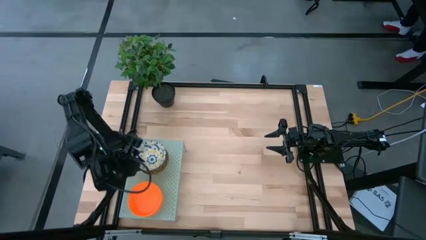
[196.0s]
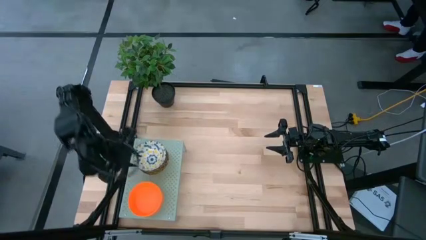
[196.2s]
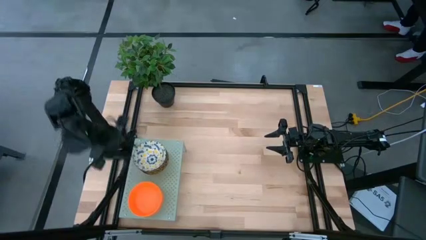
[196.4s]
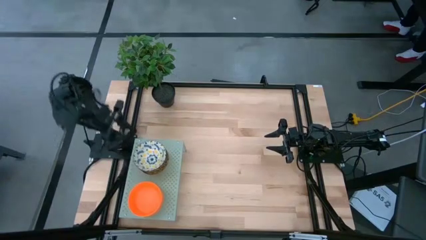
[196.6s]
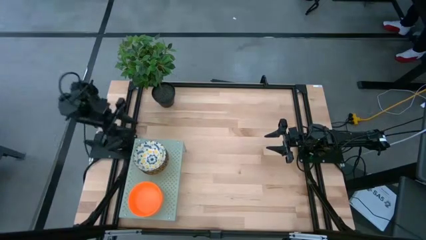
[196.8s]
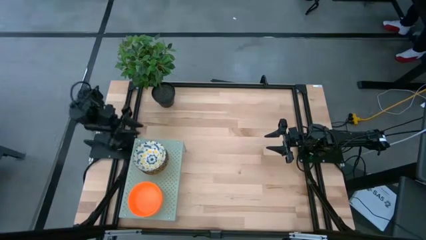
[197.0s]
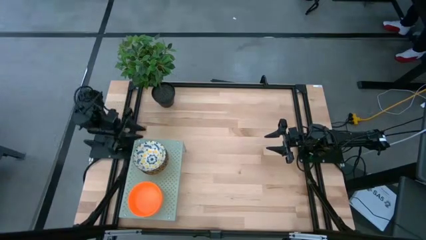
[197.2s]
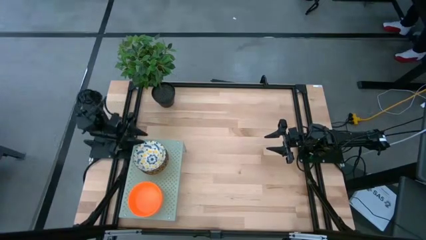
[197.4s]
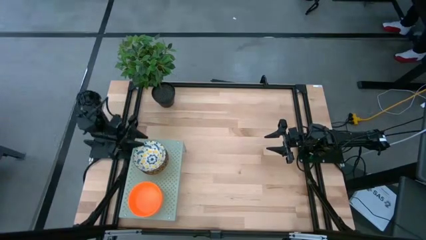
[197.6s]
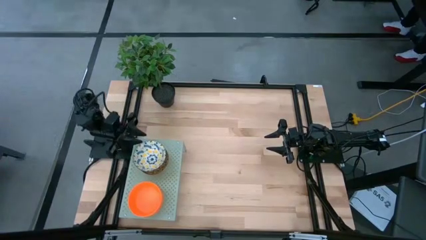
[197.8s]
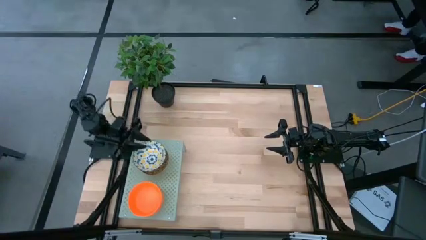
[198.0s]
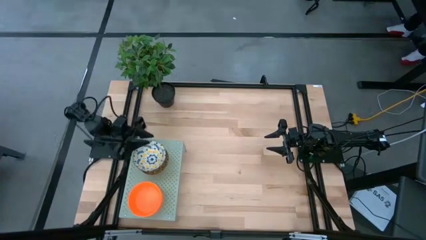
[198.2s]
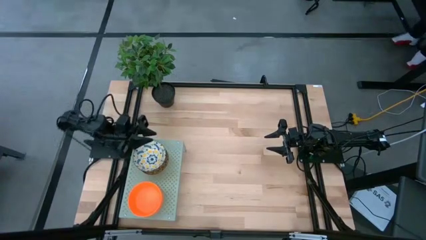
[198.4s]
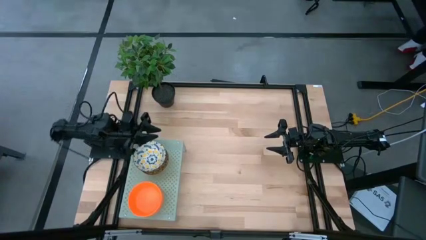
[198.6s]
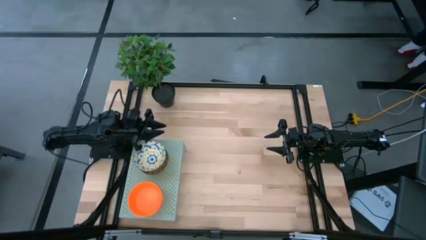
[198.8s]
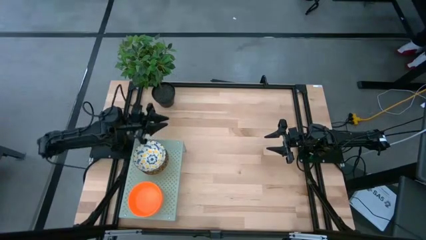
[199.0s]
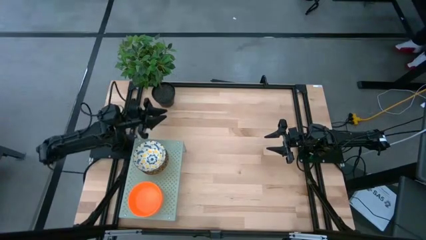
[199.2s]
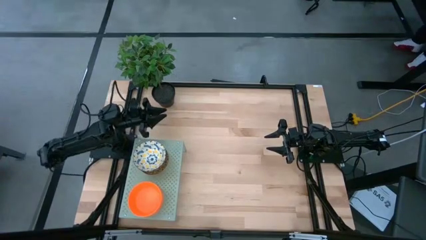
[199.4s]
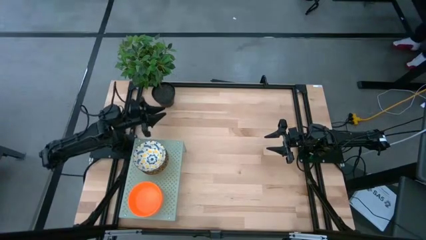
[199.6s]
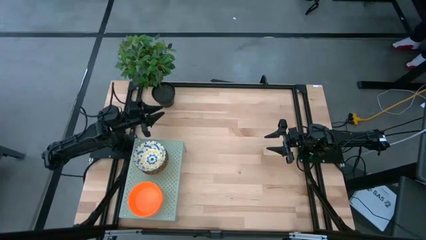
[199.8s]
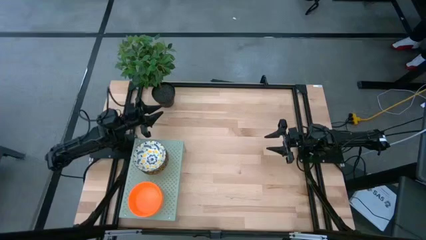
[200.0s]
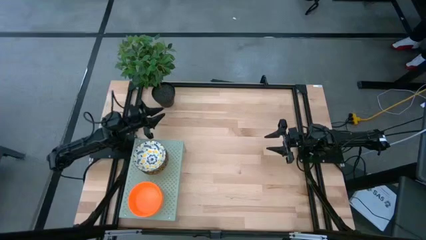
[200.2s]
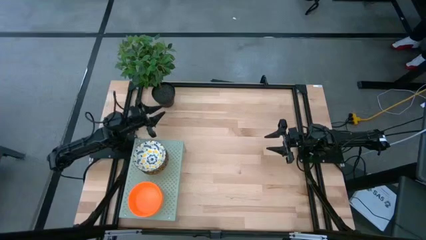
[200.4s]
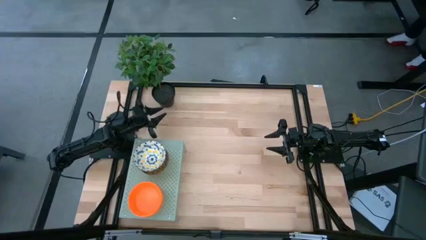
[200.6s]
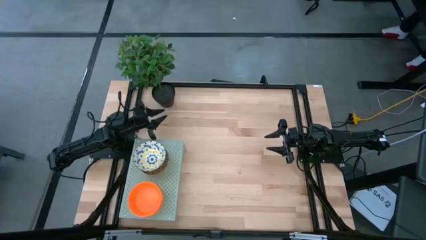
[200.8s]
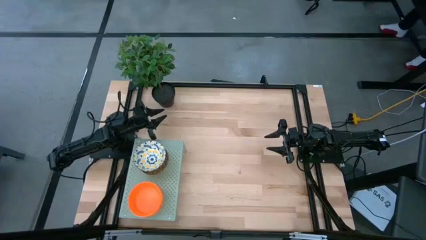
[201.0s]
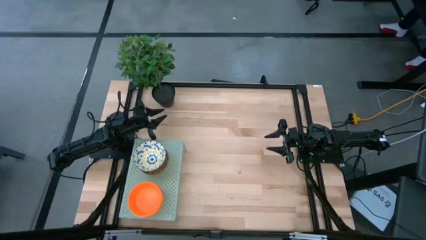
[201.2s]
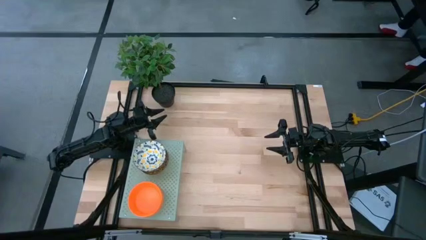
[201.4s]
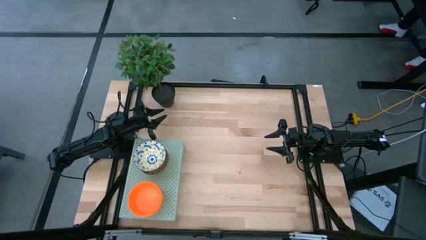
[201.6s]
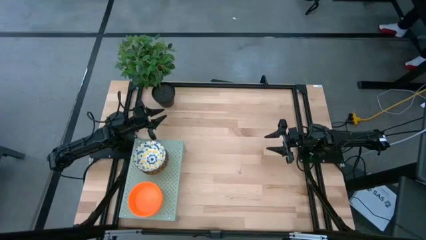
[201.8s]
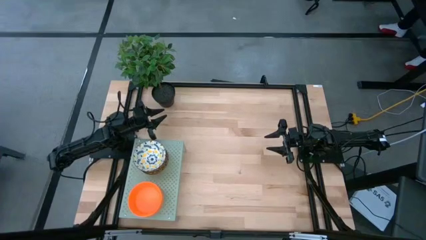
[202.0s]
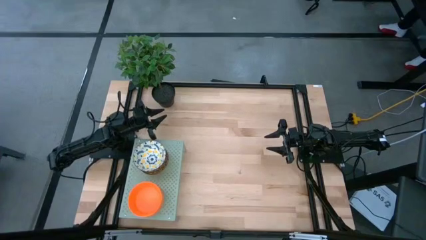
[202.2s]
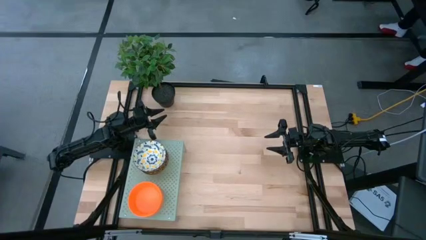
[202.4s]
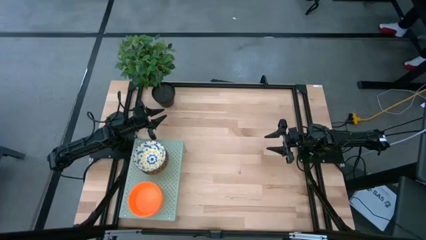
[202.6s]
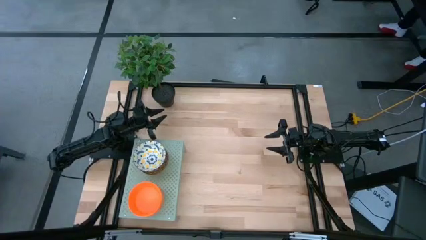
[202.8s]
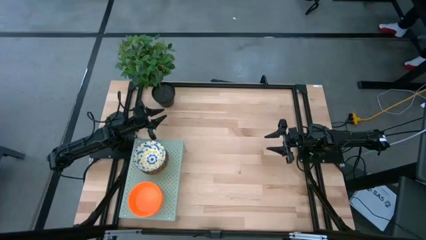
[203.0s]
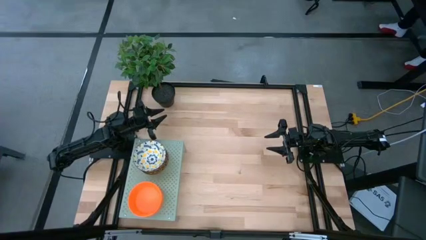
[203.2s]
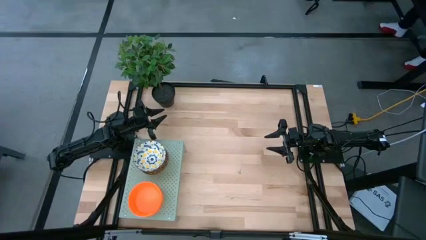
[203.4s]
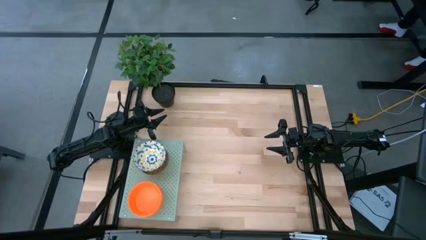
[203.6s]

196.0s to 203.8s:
Task: Pick & Place Mini bowls
Return to Home Position

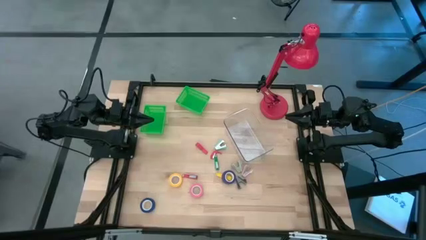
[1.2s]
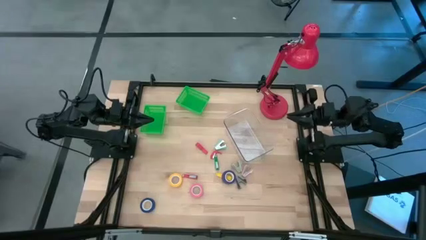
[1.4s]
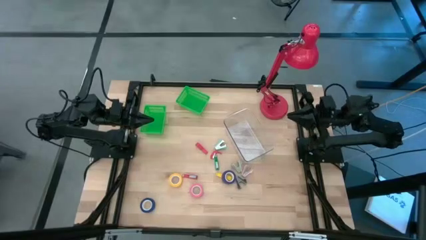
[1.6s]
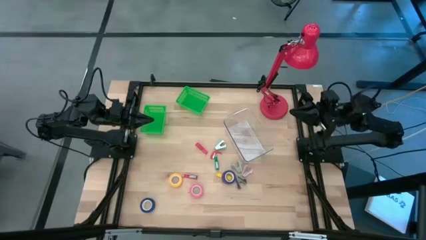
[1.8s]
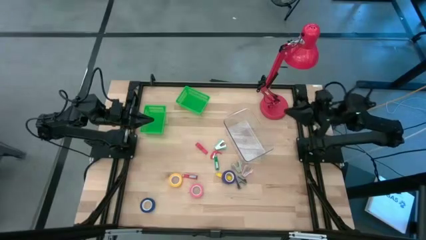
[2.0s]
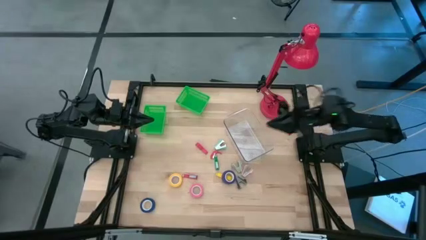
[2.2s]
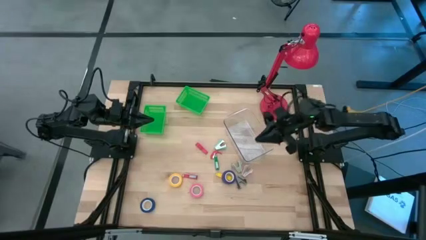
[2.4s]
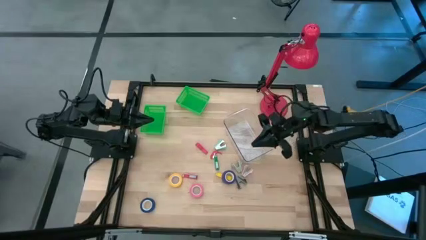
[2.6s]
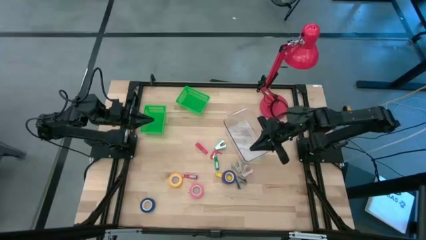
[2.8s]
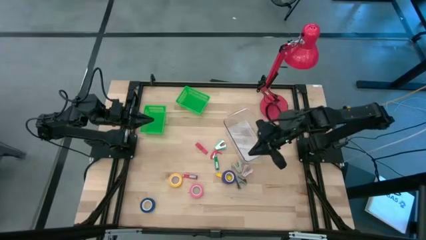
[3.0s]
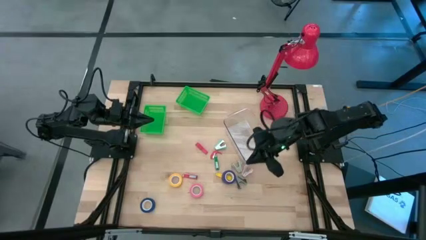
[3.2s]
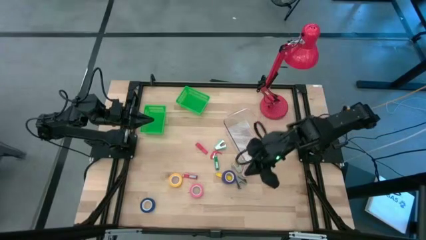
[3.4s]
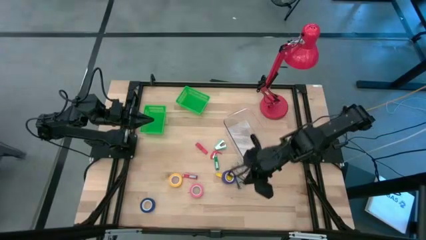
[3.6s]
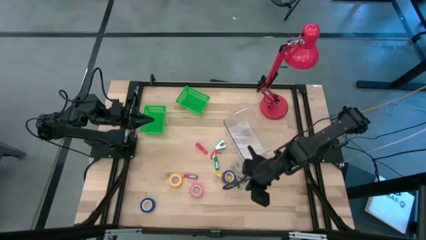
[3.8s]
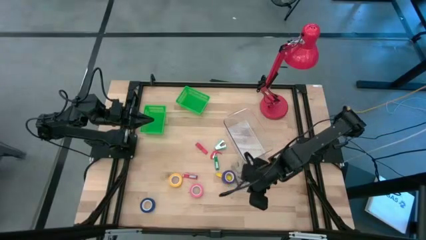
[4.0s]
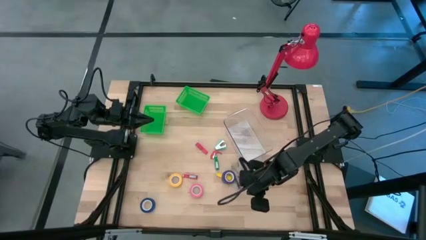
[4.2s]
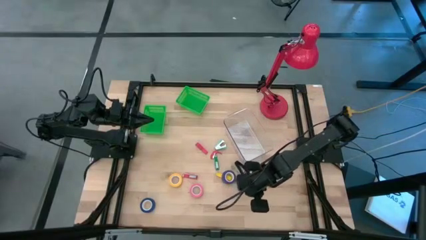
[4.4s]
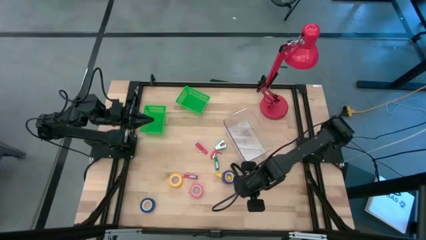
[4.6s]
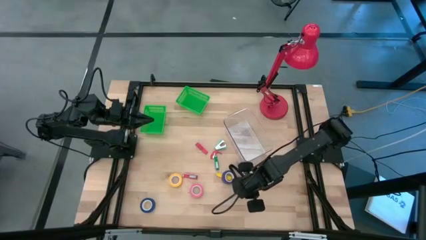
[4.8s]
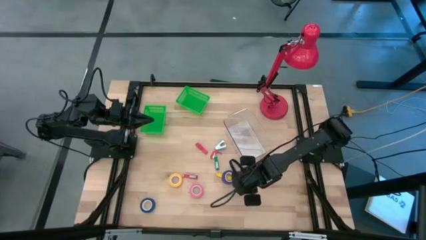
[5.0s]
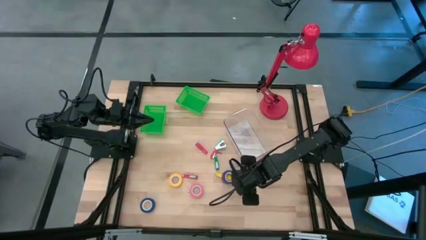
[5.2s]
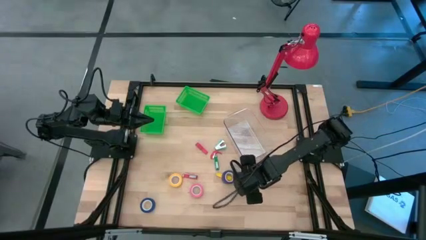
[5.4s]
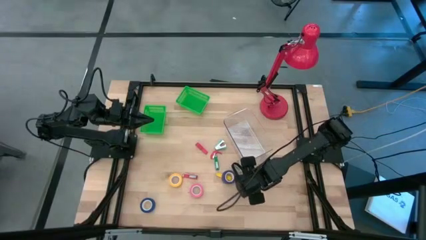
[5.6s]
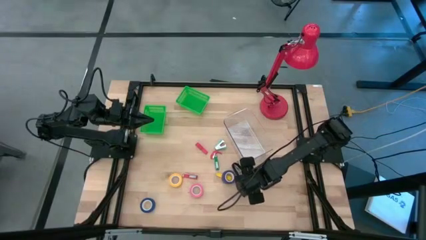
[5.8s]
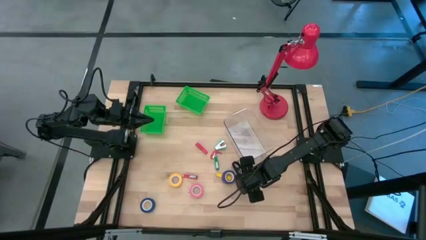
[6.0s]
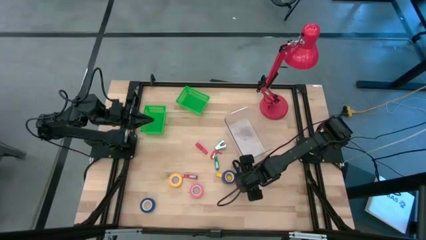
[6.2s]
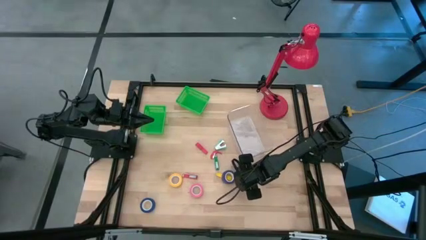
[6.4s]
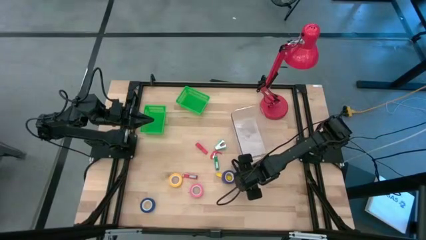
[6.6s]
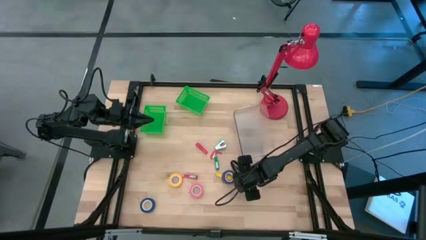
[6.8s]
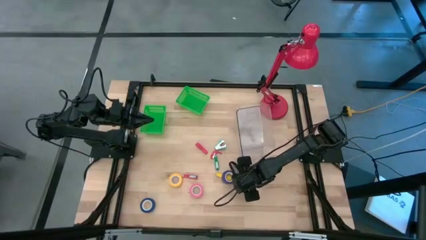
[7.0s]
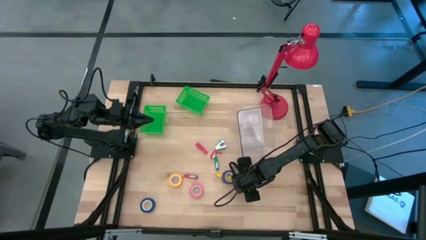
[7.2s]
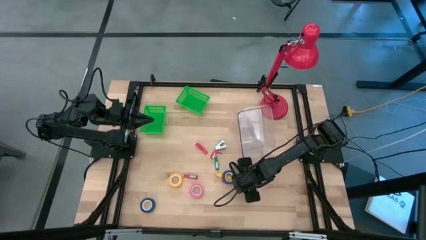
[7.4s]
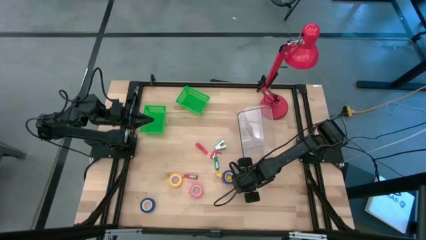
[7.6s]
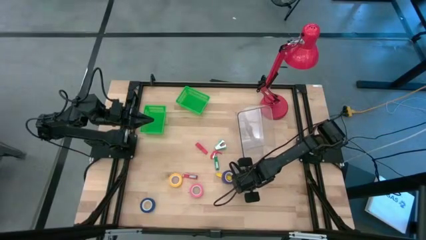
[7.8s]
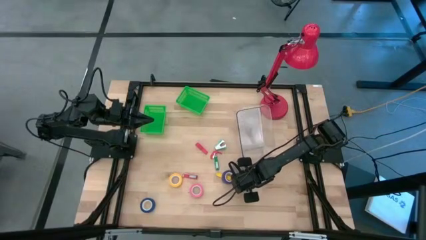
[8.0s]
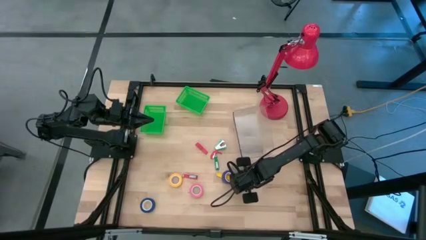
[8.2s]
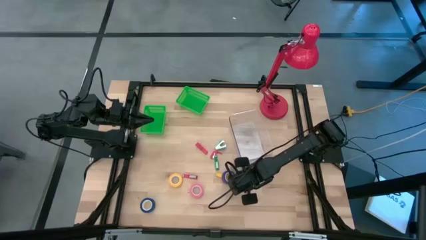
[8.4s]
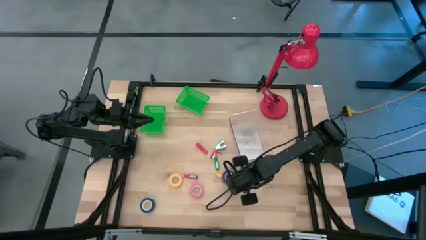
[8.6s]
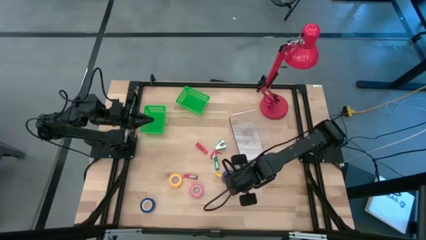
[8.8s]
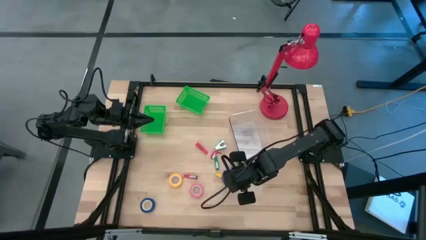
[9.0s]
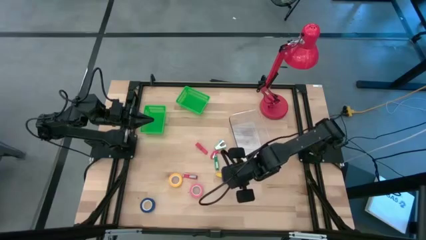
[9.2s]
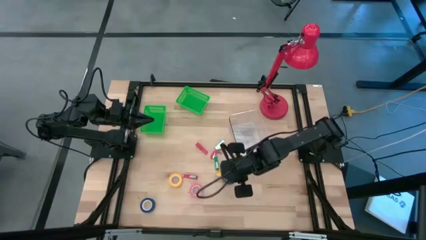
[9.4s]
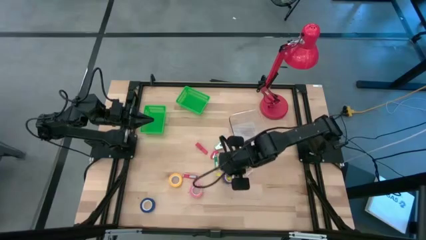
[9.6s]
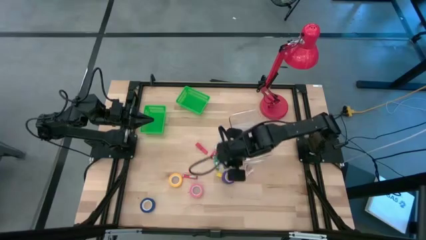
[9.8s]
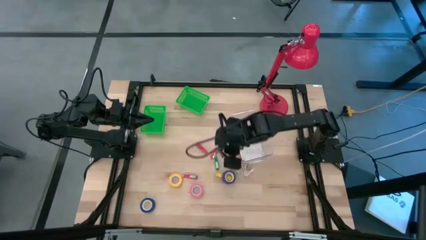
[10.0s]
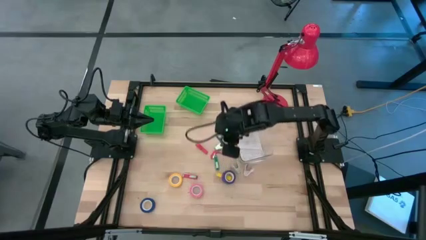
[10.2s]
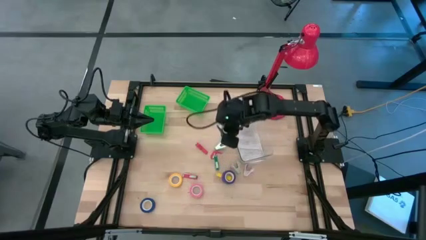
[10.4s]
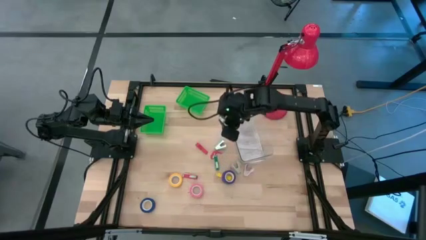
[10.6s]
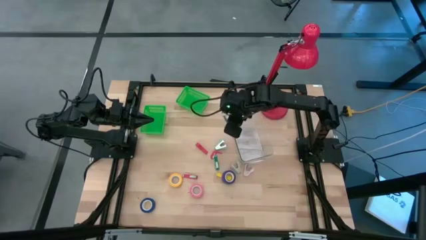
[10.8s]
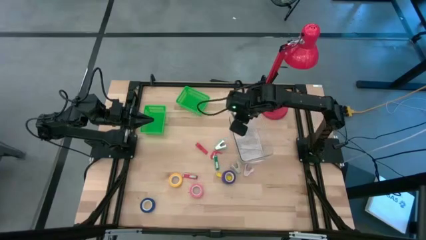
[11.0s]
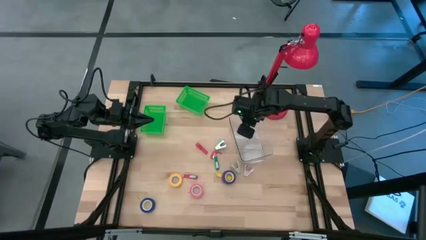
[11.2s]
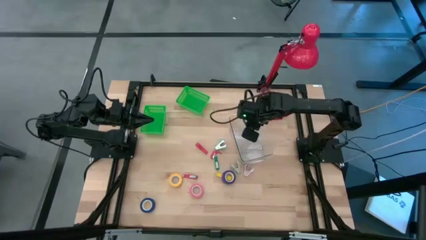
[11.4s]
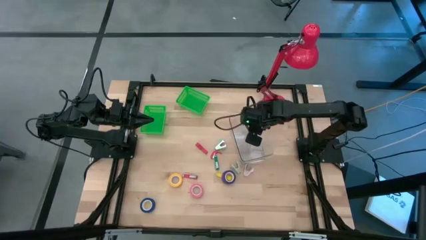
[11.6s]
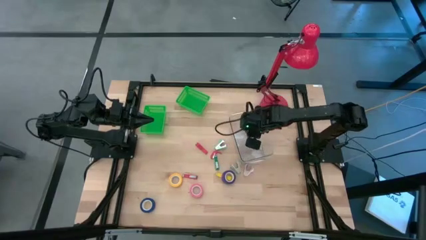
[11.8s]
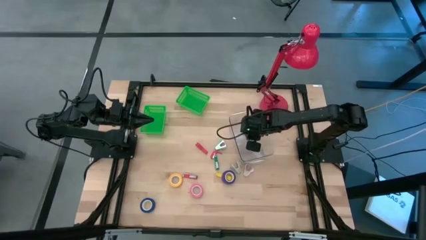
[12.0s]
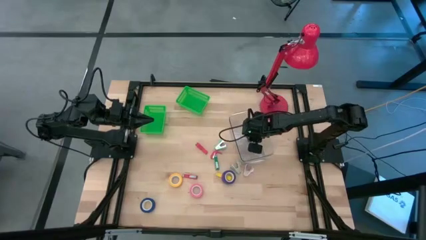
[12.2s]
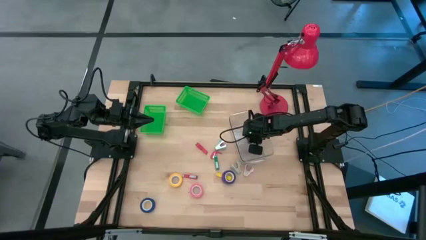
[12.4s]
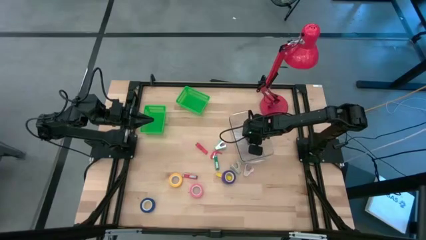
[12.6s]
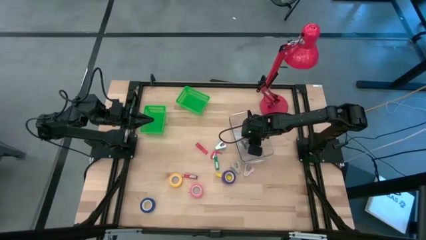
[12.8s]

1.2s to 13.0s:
Task: Pick and place Stapler, Stapler remover, tape
Put the dark gray staple remover into the transparent bin
